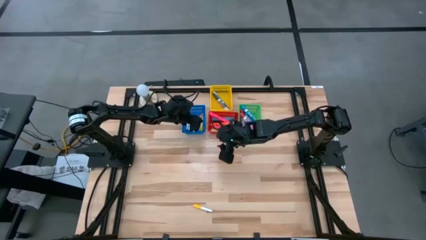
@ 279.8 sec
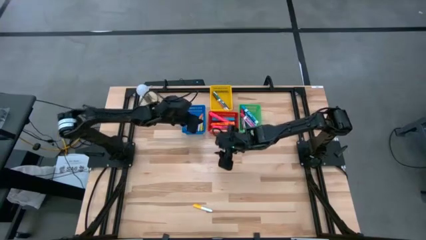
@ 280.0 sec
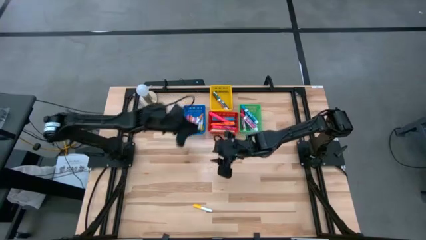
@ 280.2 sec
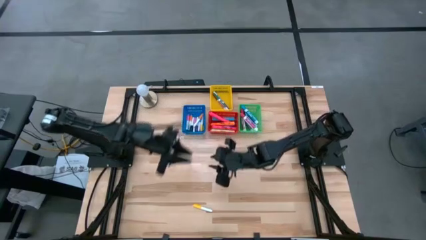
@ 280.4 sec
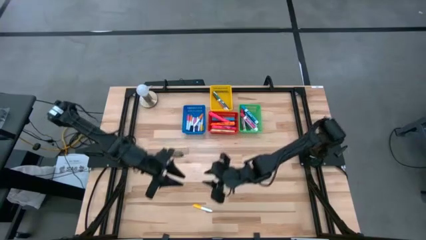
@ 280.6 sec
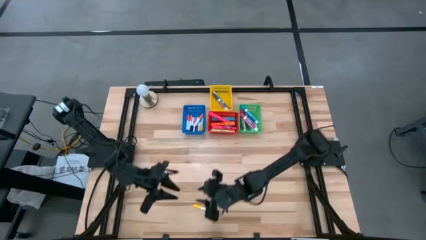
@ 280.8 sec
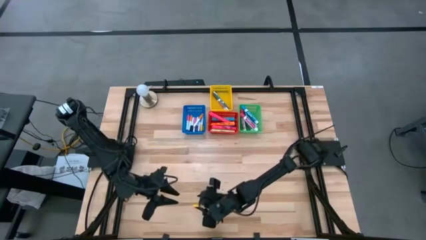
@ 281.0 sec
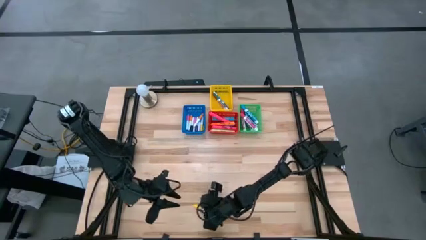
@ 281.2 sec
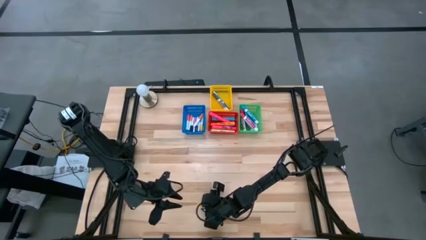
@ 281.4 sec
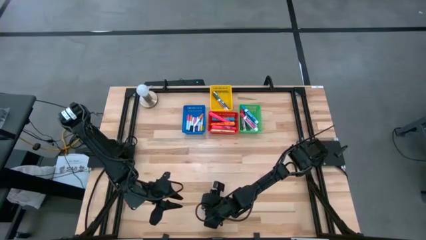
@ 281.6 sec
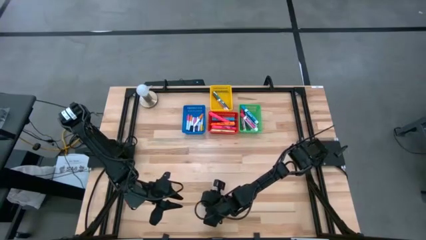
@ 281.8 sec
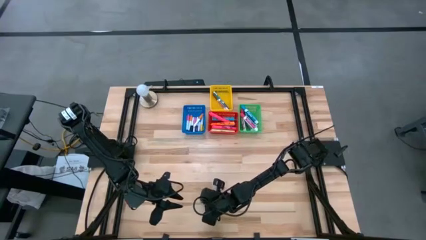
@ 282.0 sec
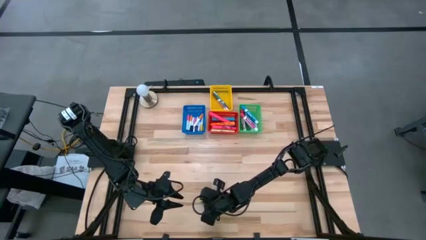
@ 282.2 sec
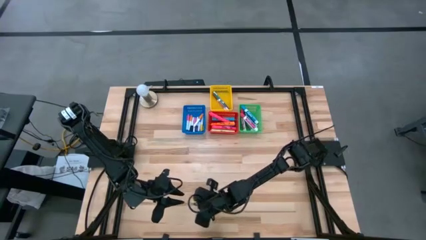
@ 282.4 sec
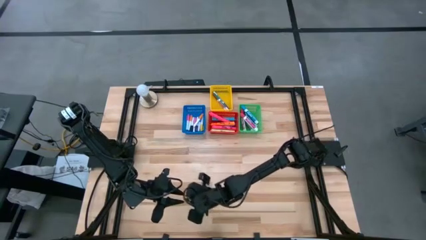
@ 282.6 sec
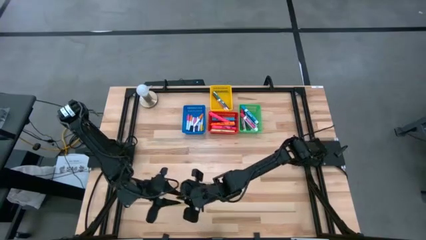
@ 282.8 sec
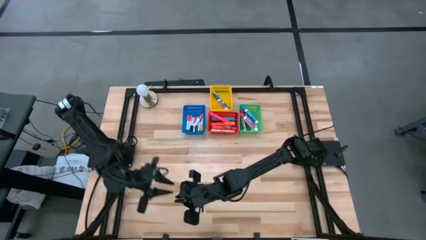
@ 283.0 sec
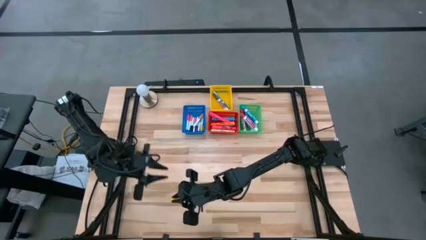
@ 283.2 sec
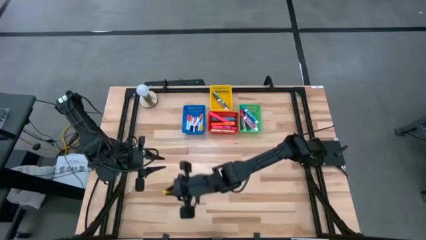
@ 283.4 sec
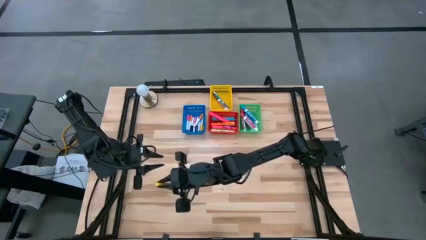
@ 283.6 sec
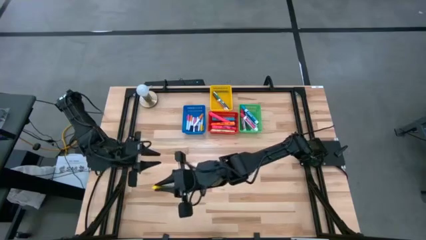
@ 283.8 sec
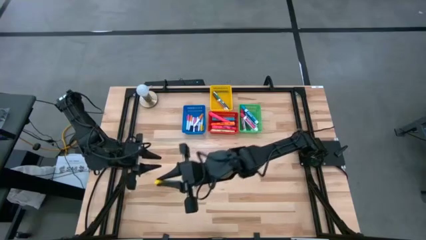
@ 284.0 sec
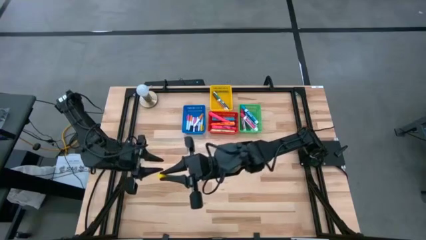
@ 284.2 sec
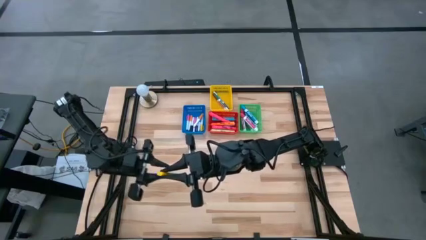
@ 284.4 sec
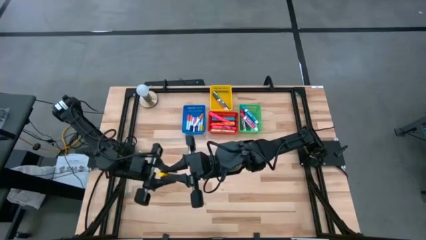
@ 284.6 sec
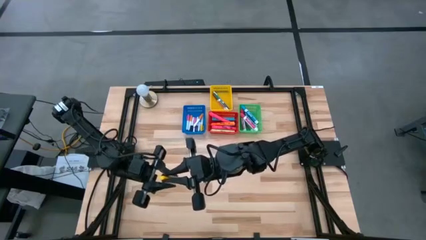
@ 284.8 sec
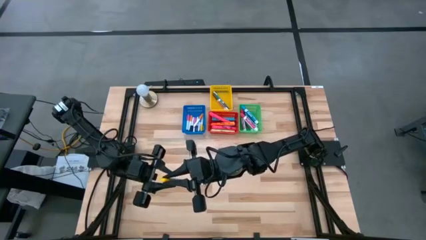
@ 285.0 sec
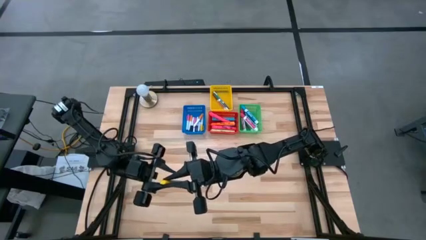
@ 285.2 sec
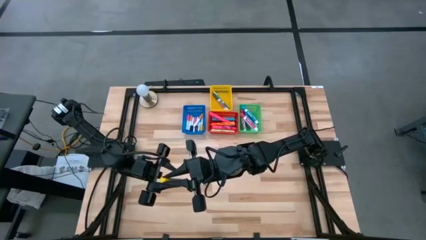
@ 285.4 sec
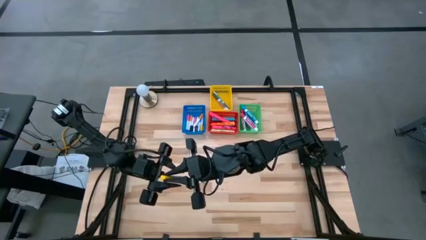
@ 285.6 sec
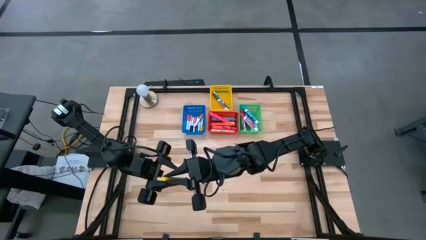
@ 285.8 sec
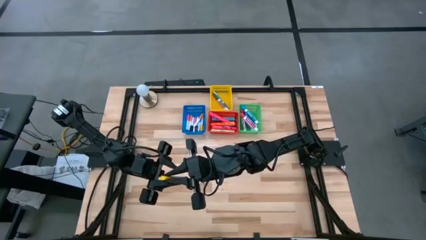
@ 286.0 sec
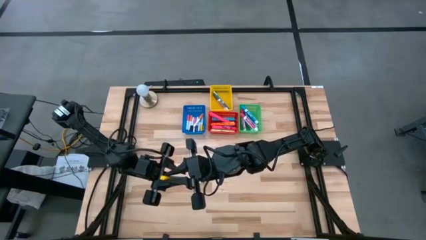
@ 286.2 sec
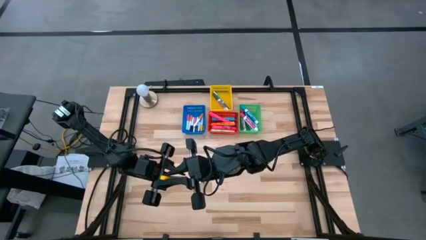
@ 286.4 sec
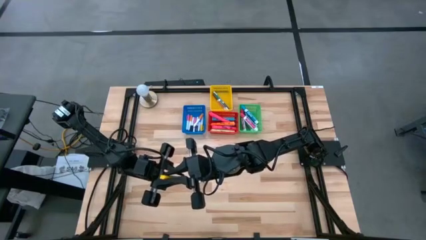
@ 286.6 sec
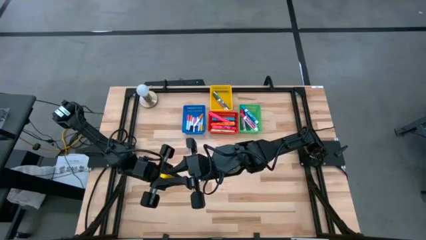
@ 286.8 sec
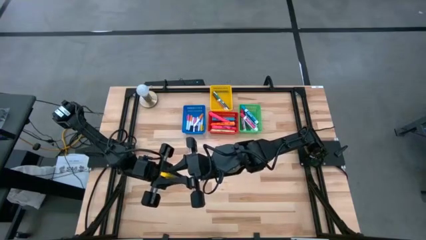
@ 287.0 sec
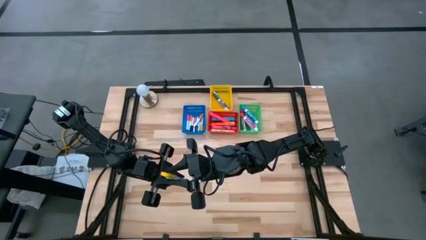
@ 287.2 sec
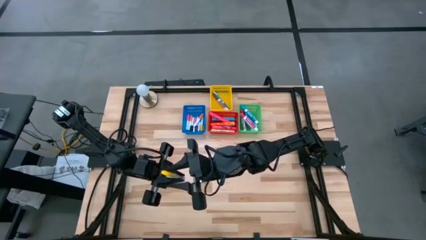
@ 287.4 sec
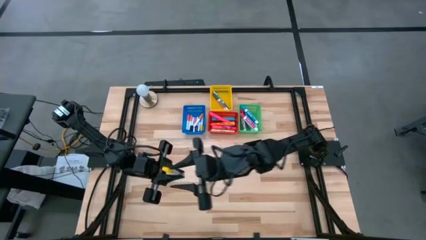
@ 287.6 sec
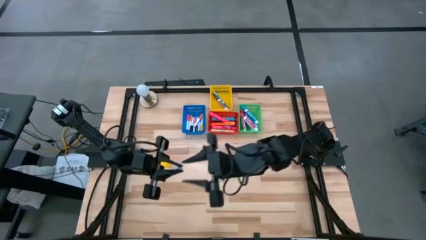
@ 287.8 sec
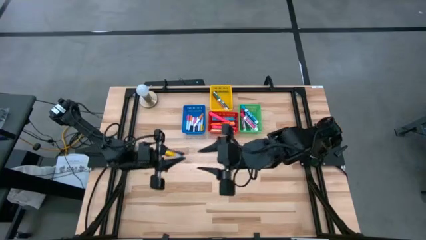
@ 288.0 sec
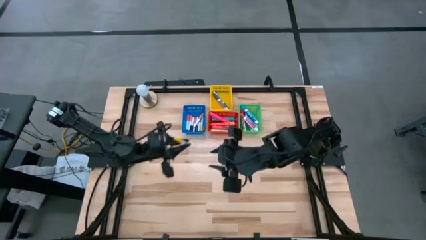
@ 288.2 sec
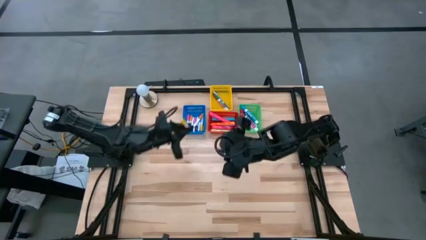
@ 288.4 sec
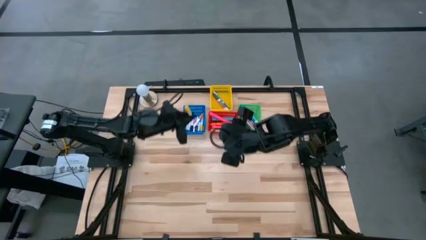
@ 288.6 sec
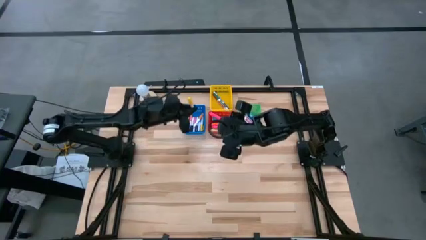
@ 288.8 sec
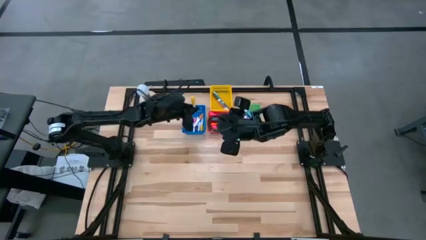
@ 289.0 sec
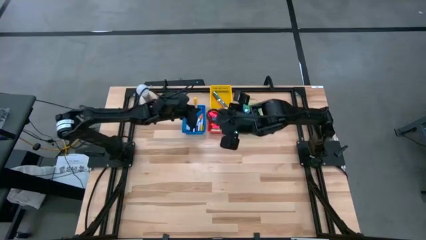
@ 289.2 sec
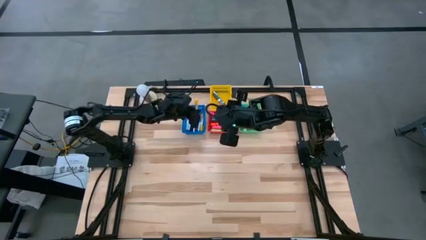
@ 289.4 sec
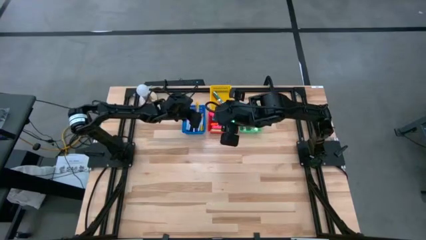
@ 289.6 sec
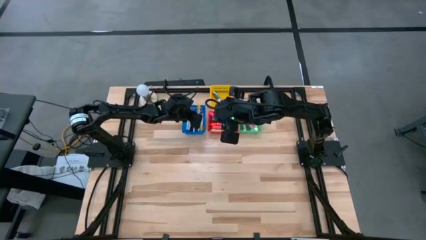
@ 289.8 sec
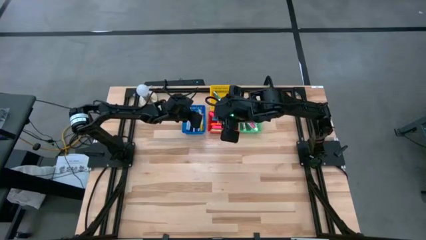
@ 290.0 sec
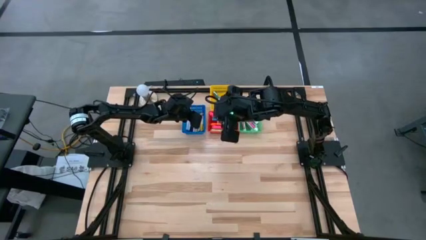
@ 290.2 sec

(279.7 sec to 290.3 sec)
Task: Pick & Place Markers
Put the small yellow highlighter pen into the blue bin

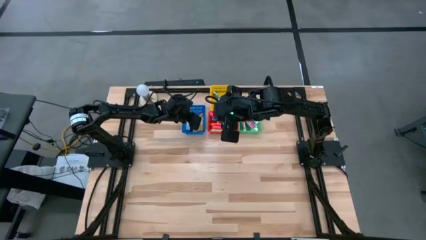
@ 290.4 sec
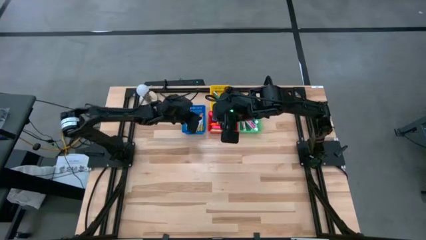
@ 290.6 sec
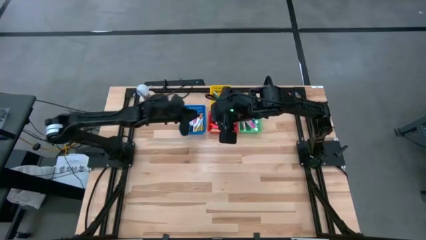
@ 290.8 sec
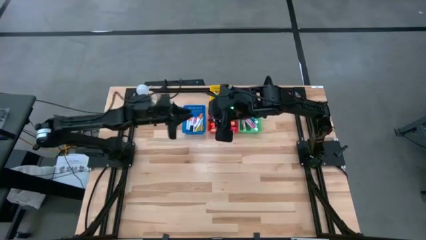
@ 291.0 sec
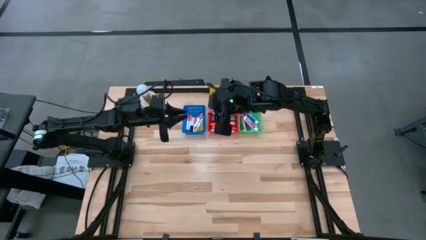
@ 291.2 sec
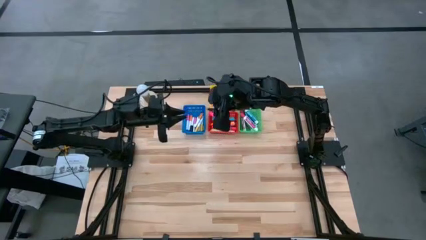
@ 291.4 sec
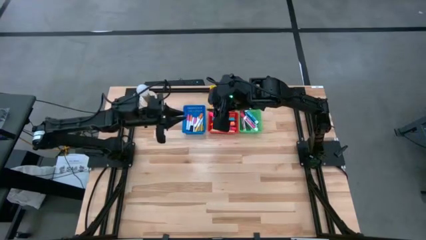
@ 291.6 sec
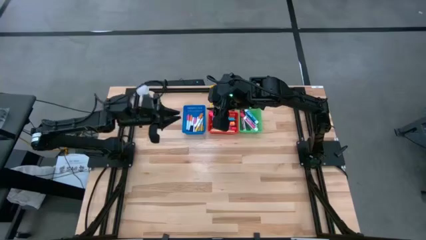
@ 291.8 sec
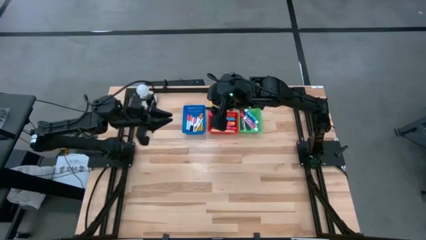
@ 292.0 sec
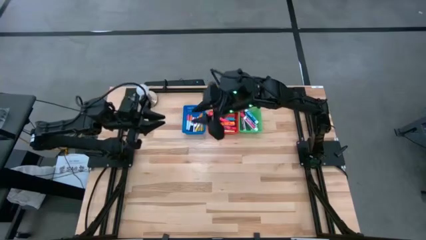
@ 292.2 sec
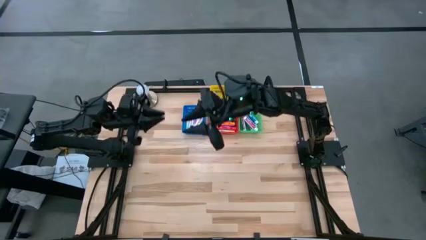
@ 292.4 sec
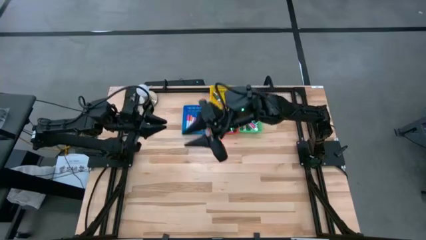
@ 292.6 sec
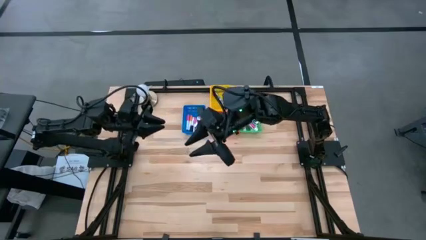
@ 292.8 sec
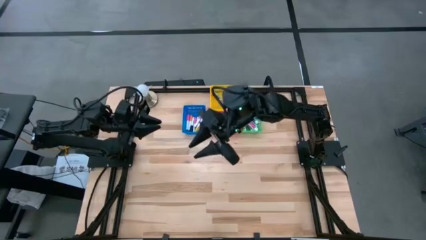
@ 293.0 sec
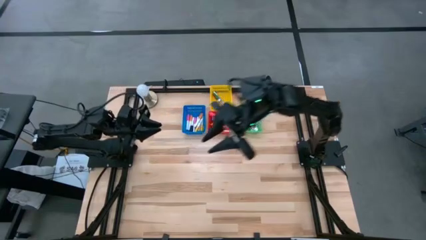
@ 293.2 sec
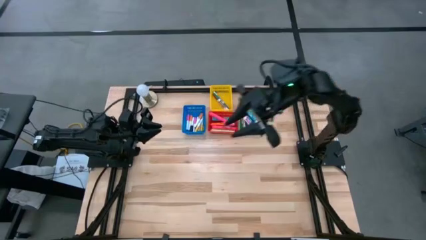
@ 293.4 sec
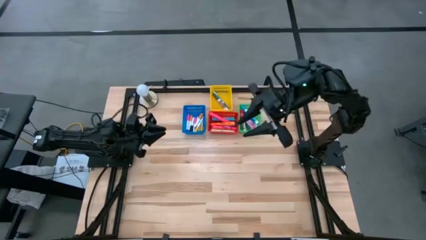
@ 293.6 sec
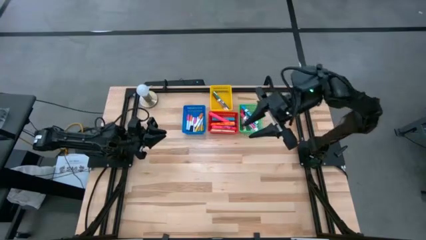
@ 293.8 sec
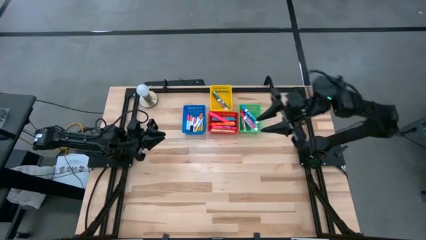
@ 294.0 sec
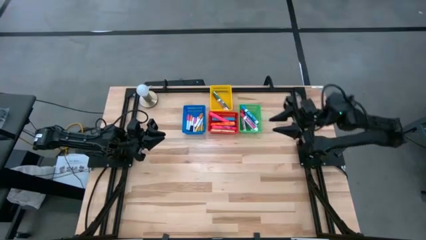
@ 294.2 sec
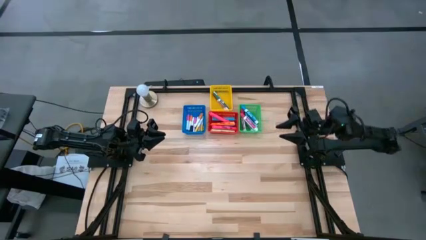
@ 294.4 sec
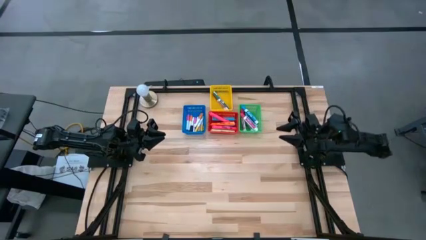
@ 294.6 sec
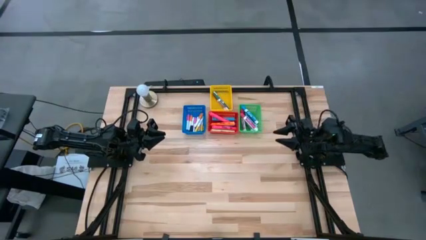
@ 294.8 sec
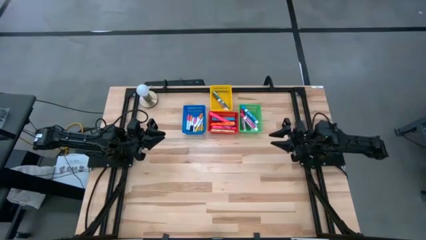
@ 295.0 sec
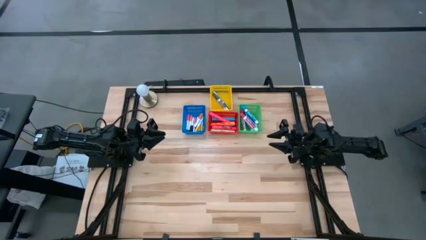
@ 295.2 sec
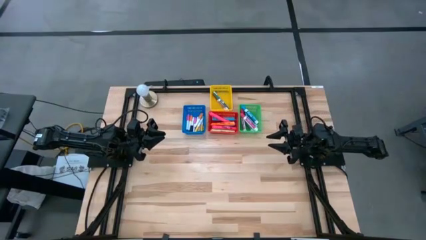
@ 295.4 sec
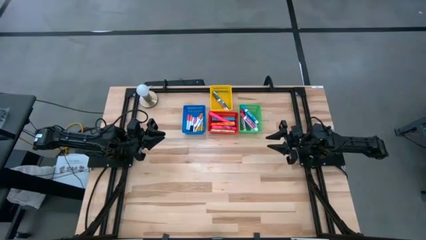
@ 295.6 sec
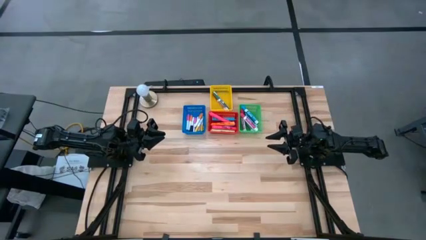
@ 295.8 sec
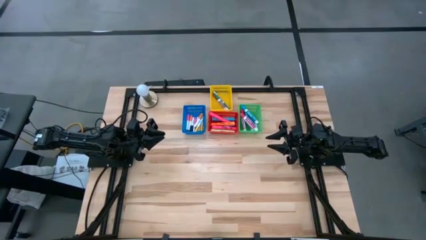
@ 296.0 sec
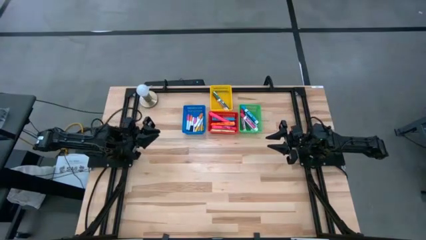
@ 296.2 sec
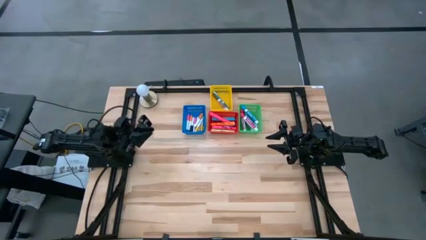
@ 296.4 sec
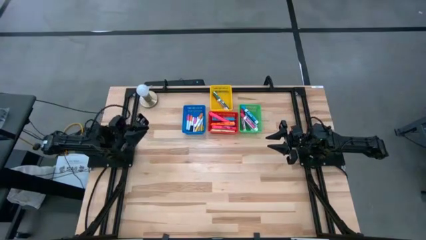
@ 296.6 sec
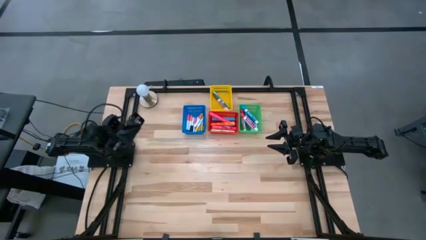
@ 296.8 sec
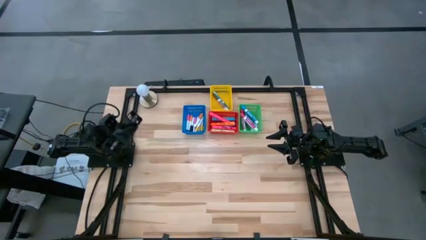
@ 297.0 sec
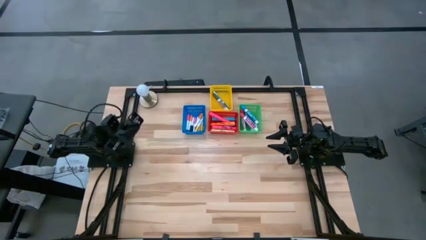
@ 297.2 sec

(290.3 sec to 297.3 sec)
Return to Home Position
